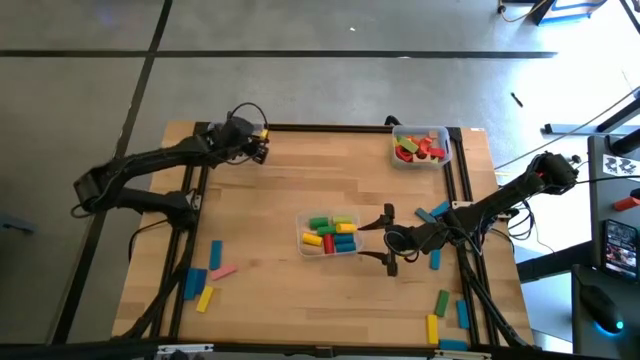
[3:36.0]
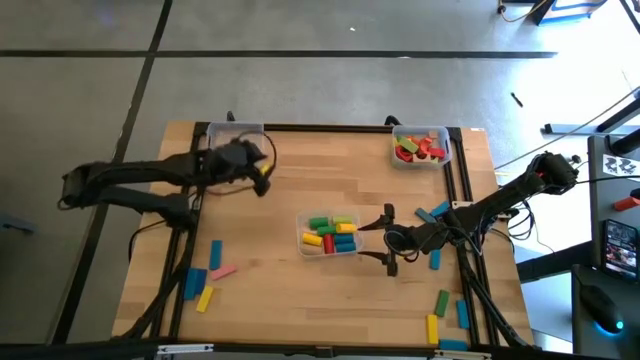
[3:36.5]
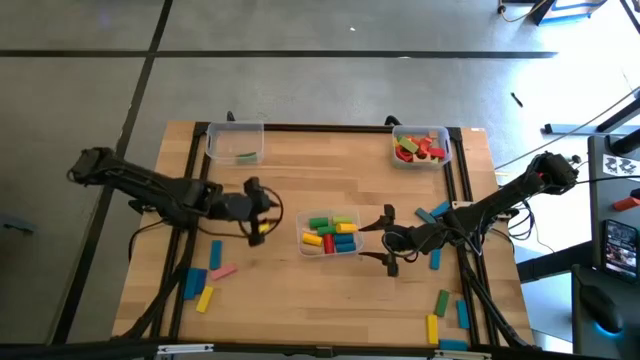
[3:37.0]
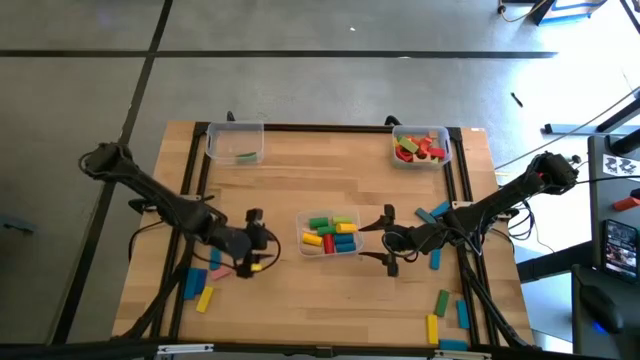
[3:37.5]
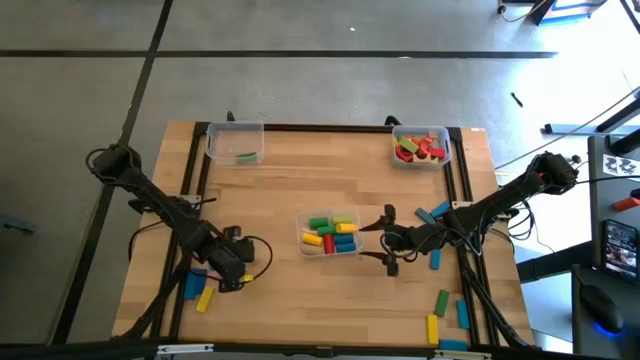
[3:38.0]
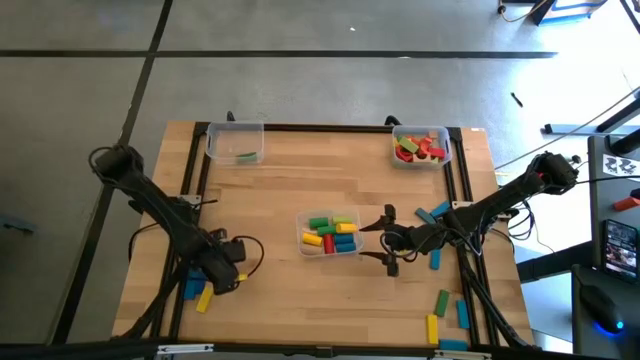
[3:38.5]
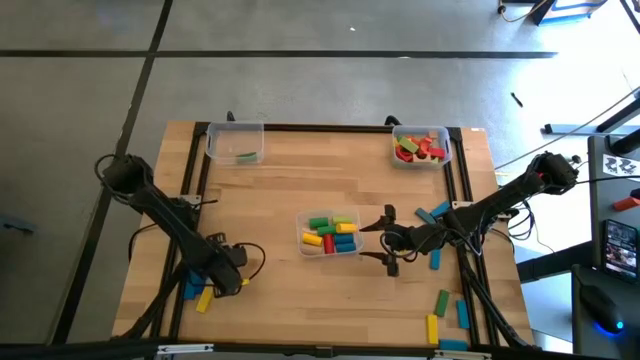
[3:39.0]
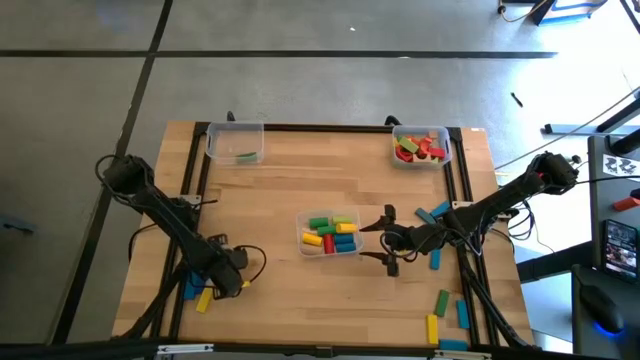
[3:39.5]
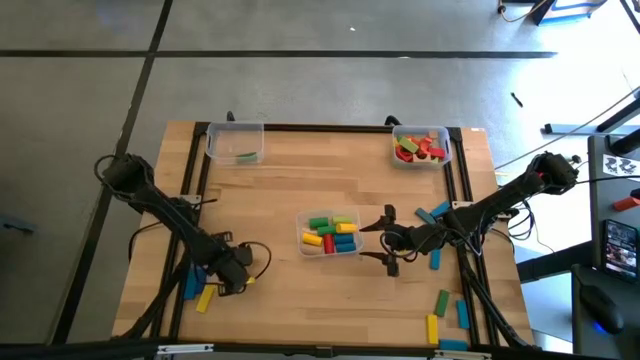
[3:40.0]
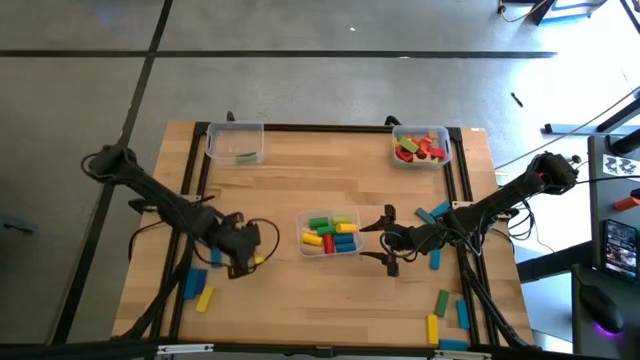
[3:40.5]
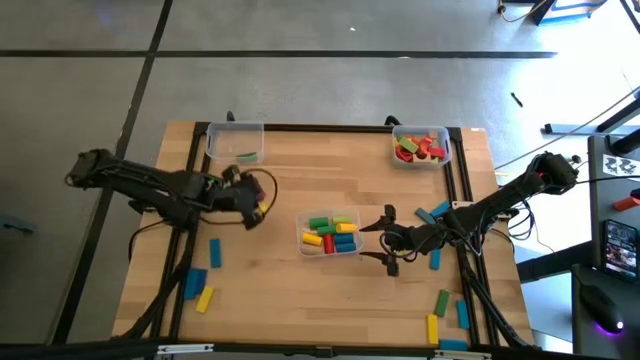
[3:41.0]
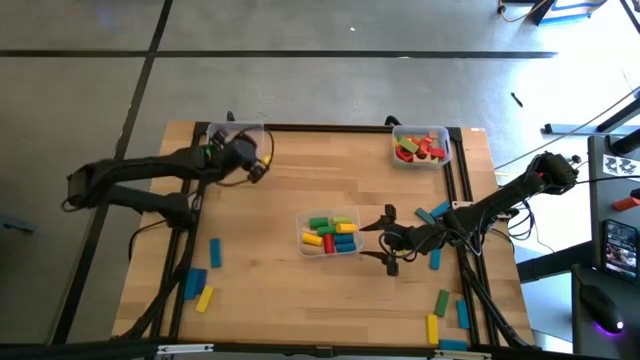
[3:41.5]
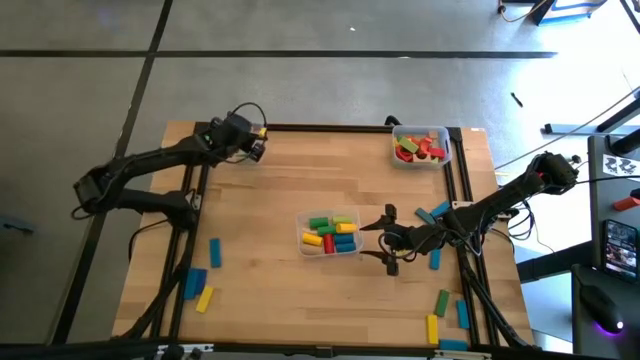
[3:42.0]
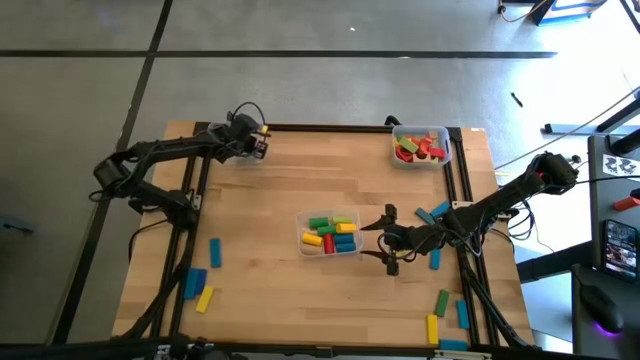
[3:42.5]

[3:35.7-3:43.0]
Task: Sort blocks by size
Put the pink rectangular block into the top left transparent bin

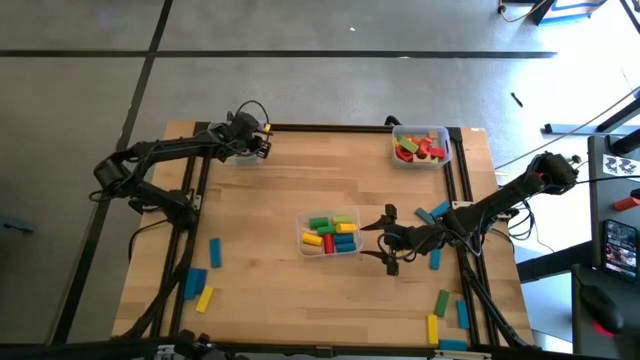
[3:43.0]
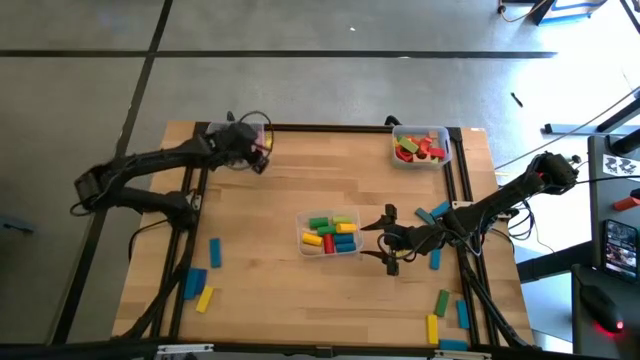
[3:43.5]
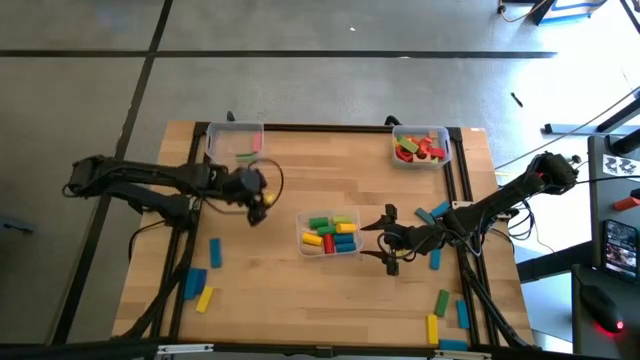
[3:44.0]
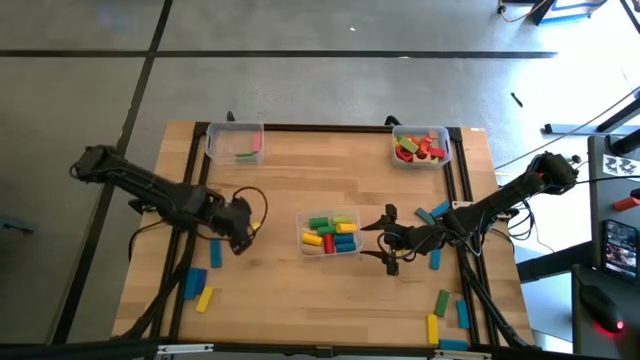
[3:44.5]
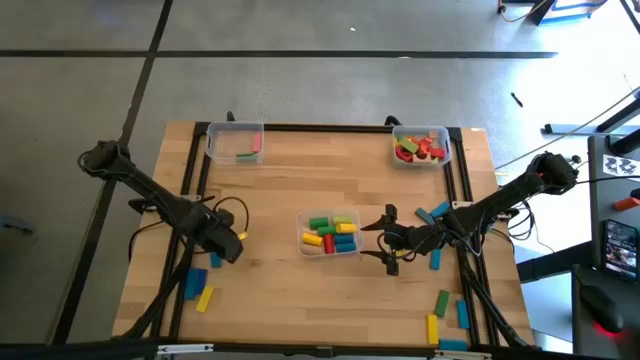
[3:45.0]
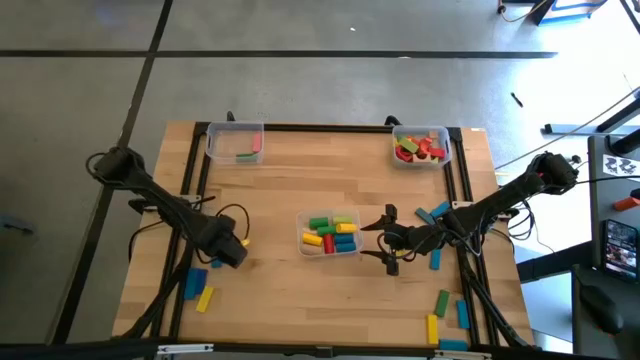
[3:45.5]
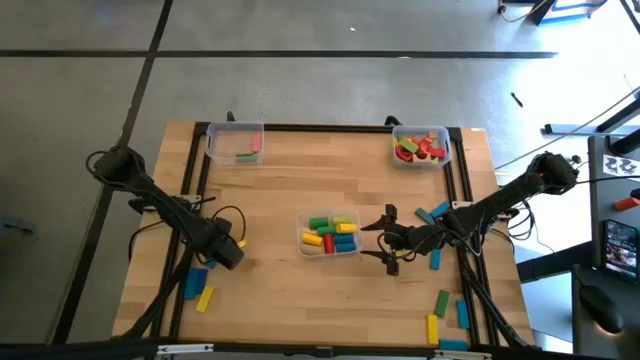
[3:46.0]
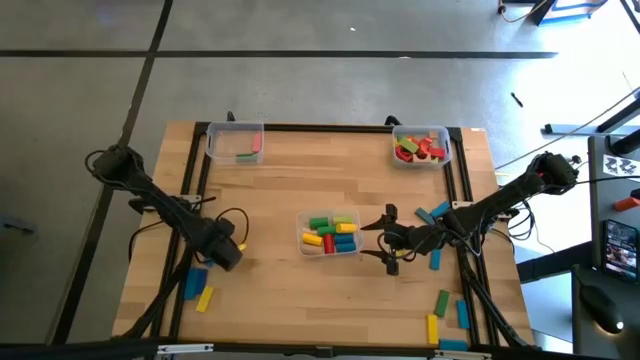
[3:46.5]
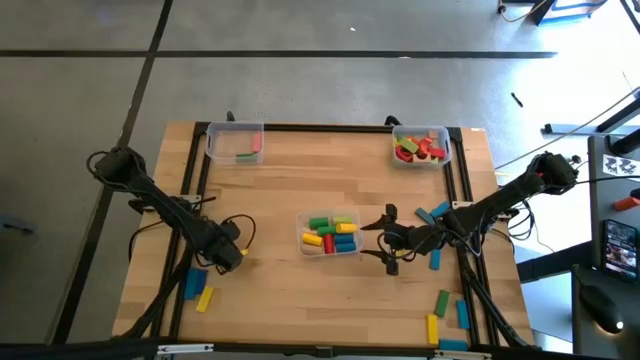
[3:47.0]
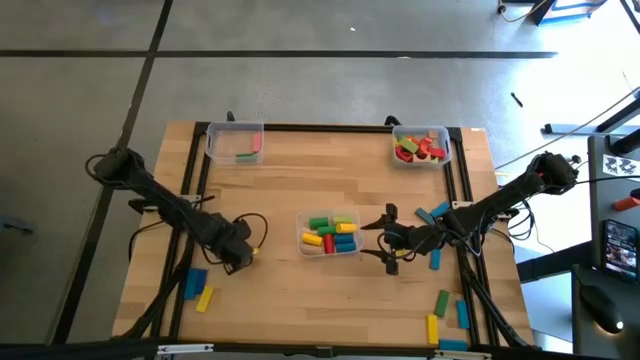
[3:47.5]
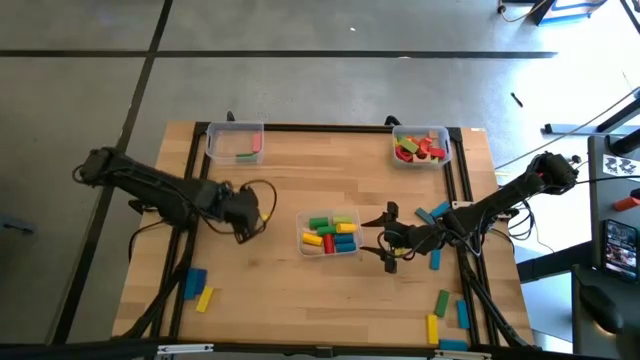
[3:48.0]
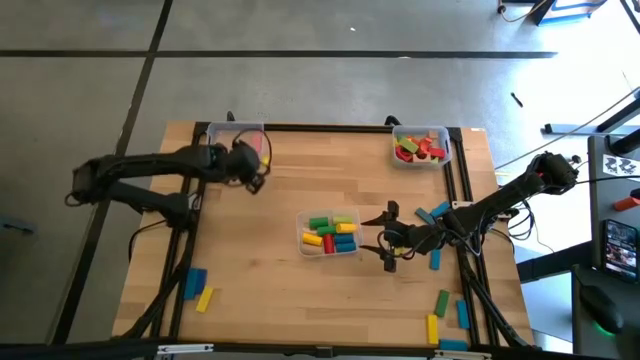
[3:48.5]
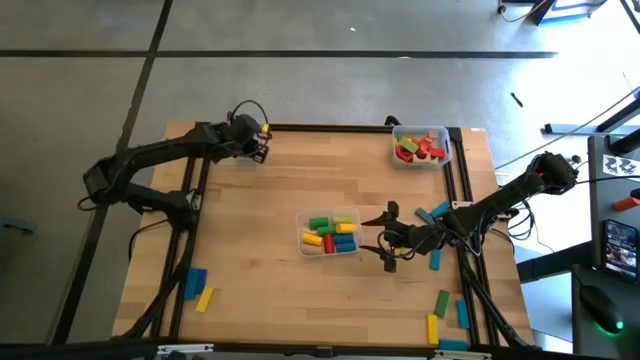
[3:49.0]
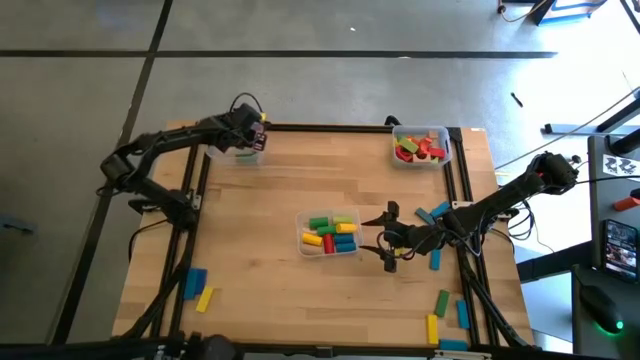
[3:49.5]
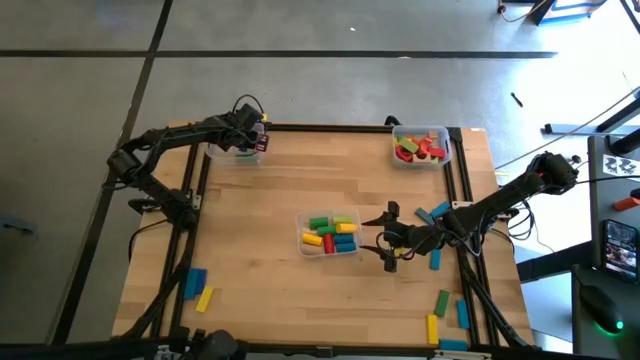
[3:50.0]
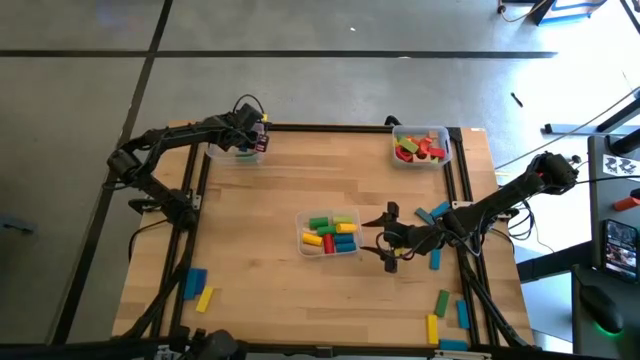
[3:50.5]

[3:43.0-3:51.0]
Put the blue rectangular block into the top left transparent bin

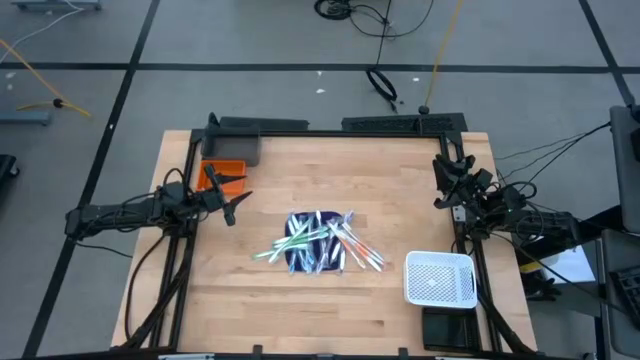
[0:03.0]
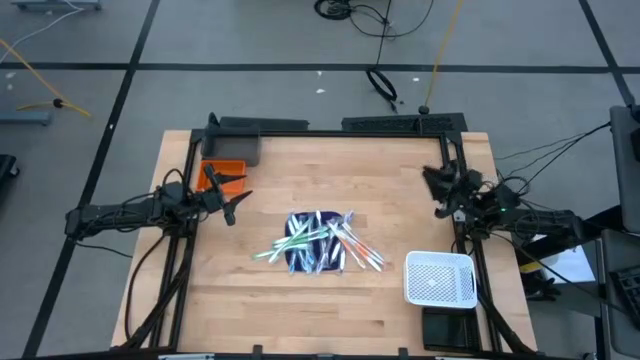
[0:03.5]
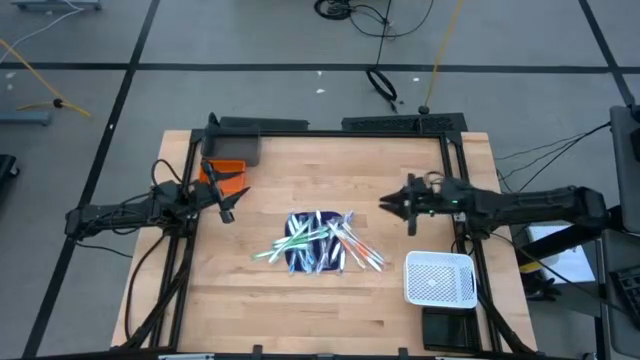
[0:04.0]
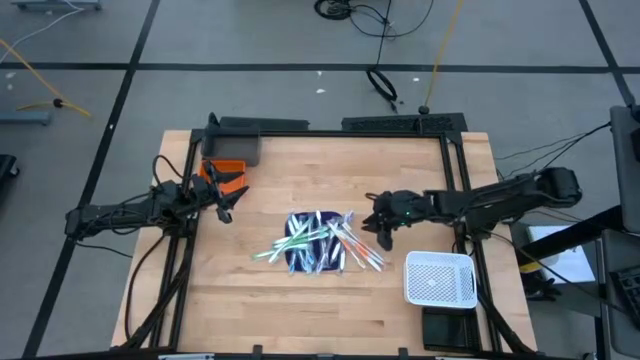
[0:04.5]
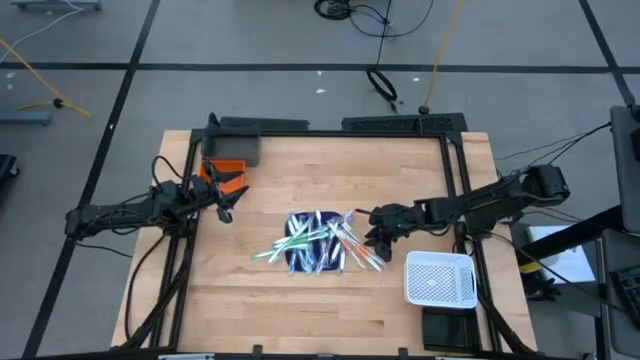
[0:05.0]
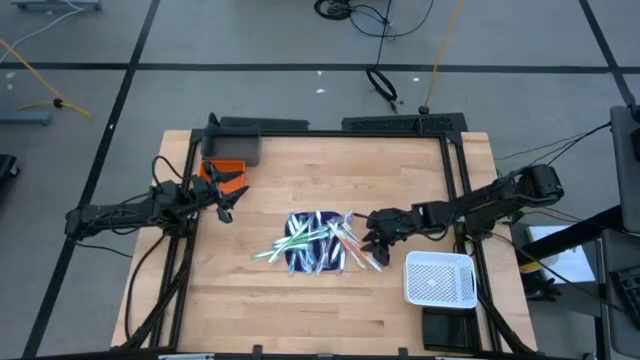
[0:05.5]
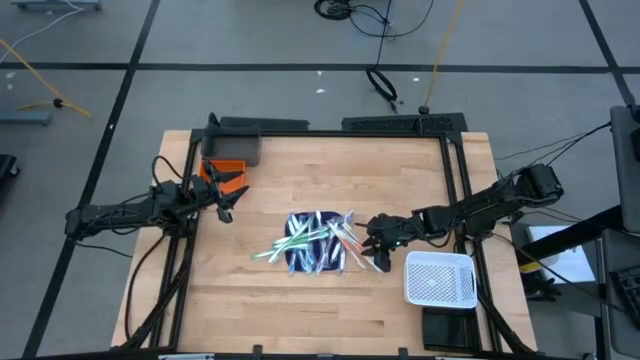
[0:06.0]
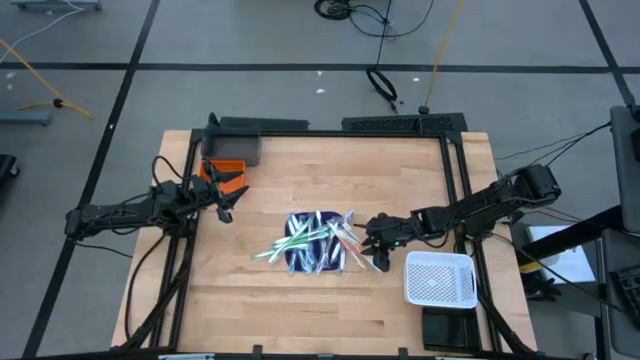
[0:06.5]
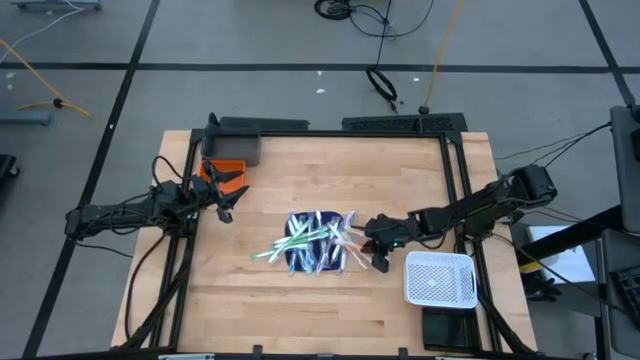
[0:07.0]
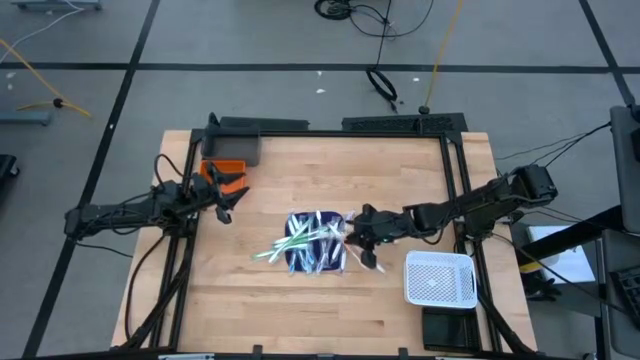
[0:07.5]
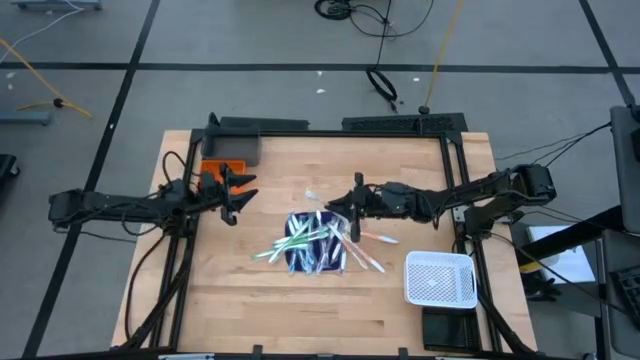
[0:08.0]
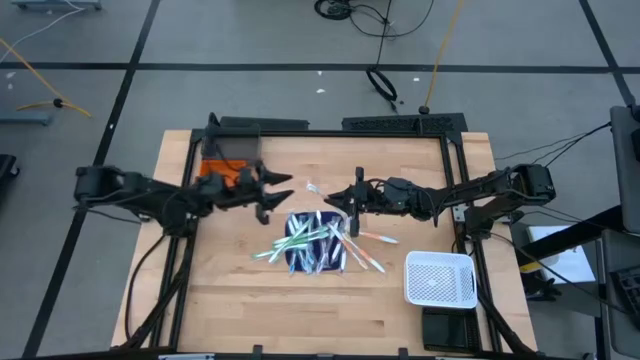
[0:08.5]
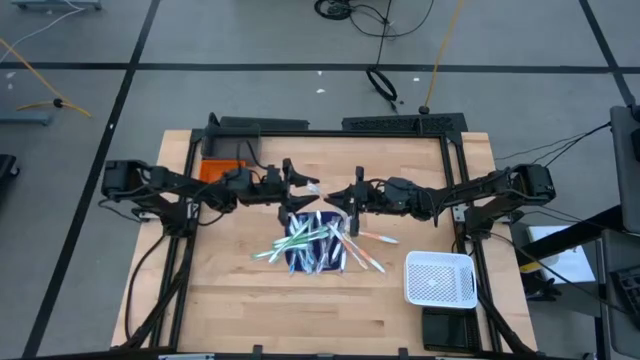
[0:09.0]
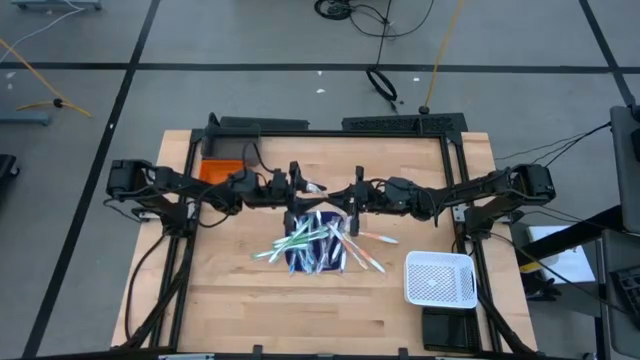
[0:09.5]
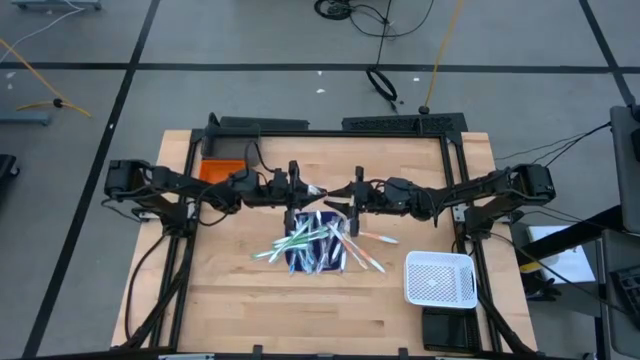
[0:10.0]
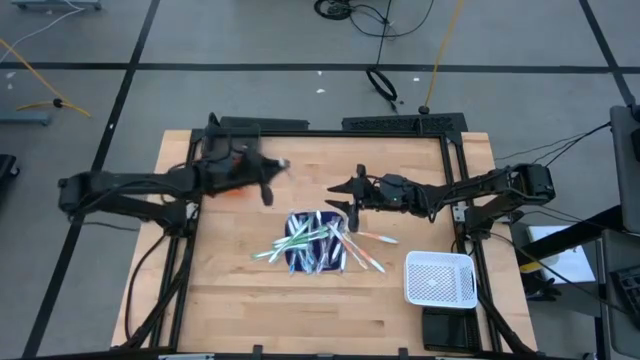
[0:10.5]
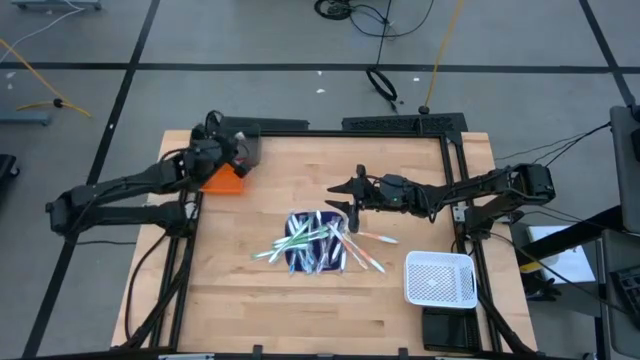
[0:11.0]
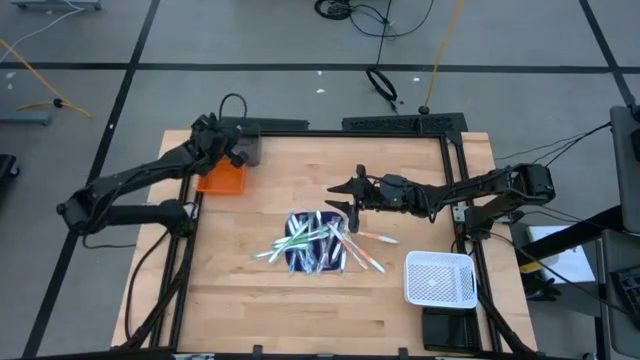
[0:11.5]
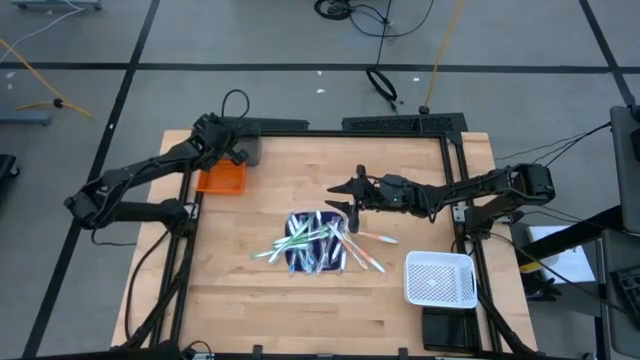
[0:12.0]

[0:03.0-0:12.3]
Task: Pick & Place Toothbrushes
Put the orange toothbrush into the transparent black bin
